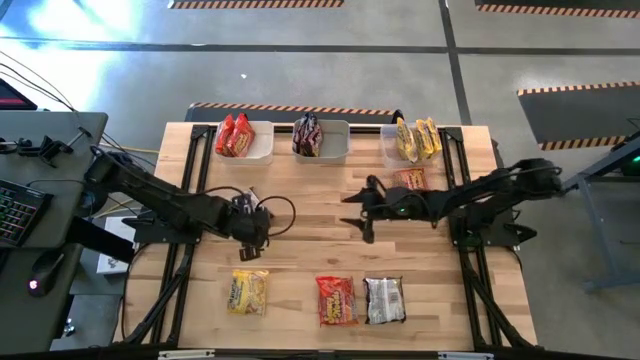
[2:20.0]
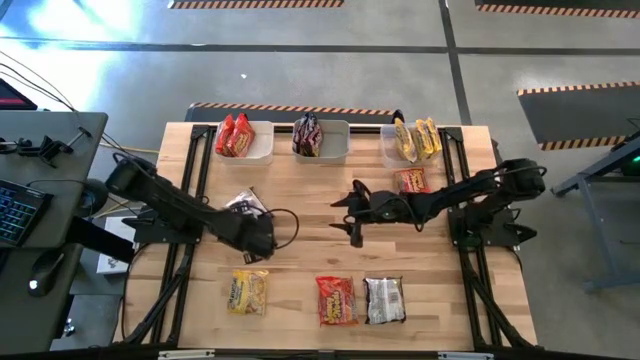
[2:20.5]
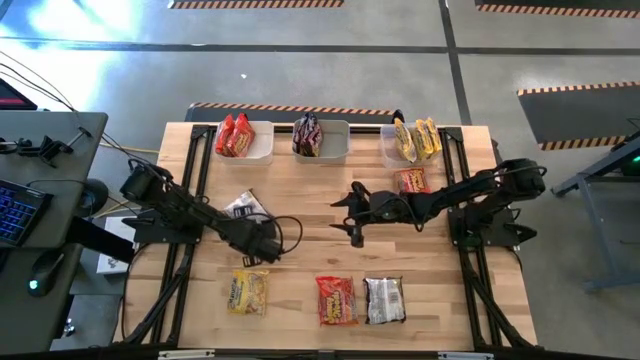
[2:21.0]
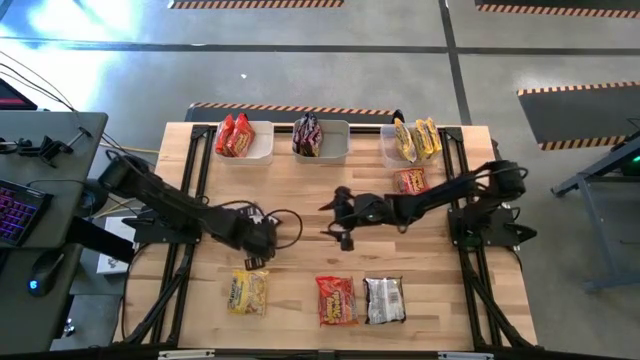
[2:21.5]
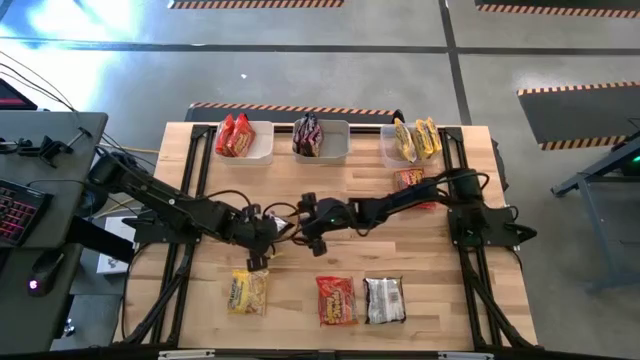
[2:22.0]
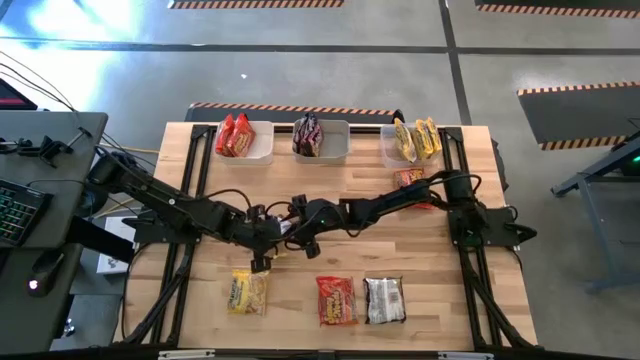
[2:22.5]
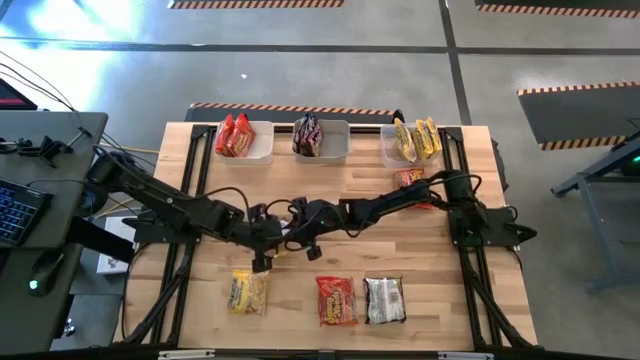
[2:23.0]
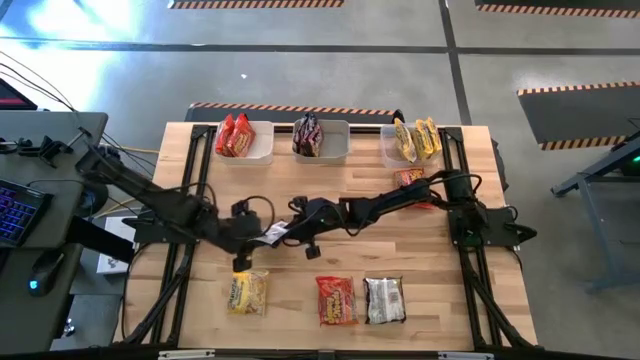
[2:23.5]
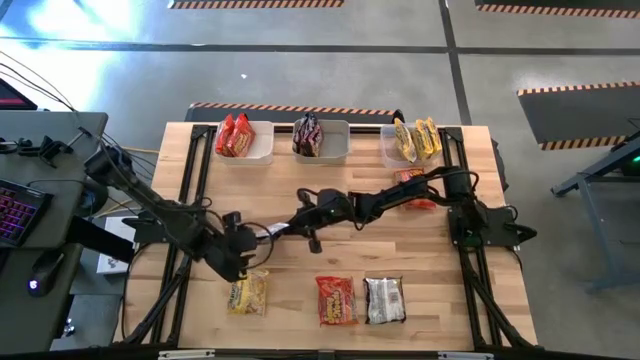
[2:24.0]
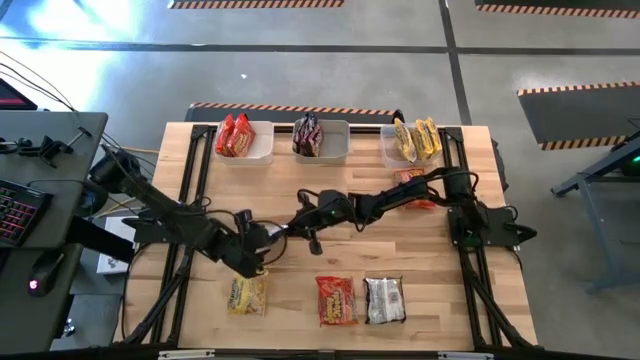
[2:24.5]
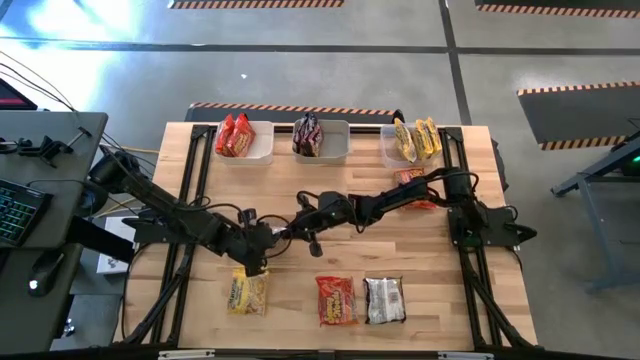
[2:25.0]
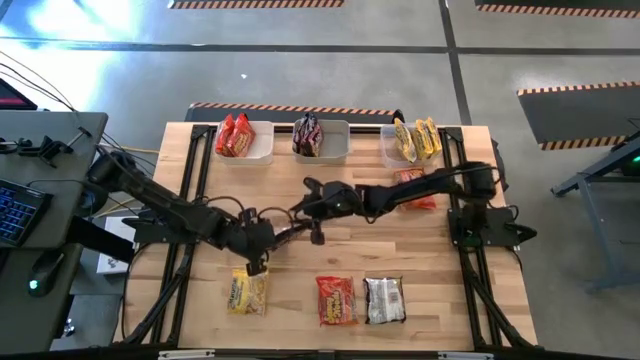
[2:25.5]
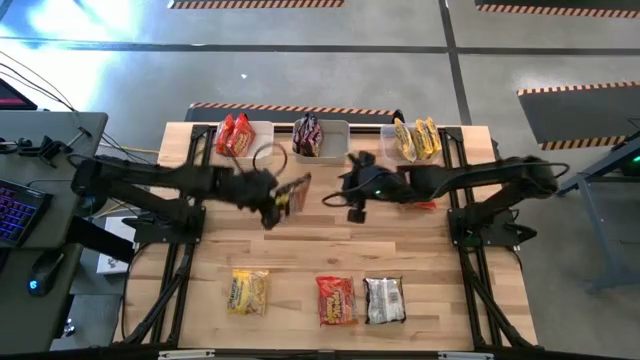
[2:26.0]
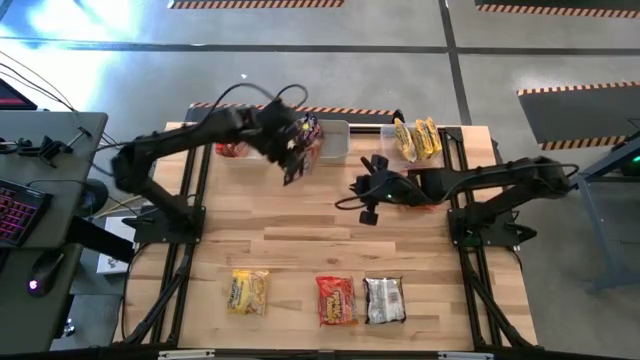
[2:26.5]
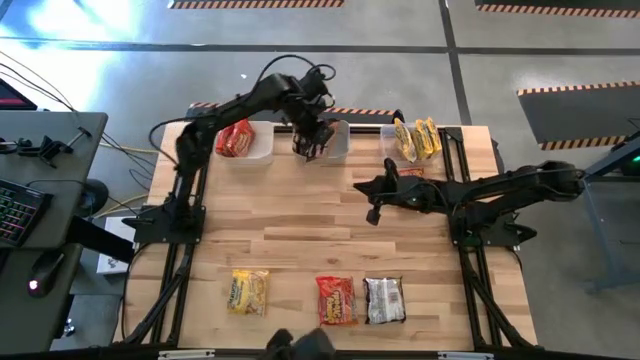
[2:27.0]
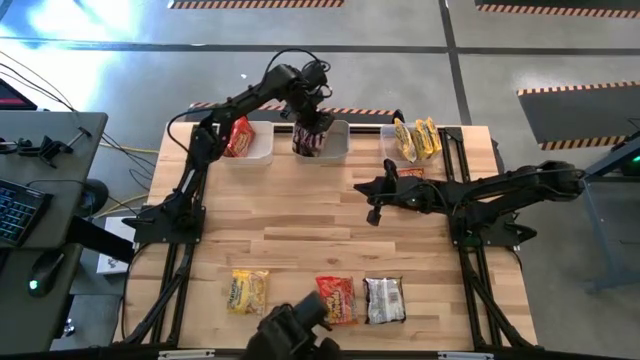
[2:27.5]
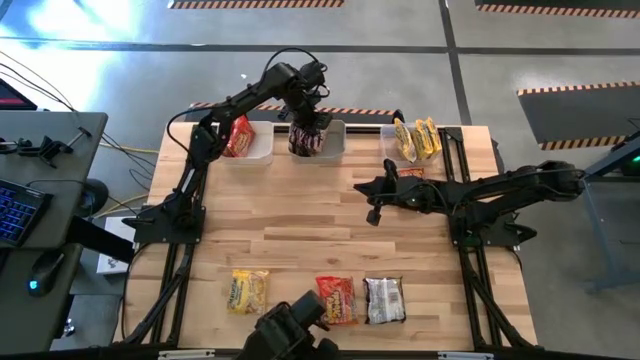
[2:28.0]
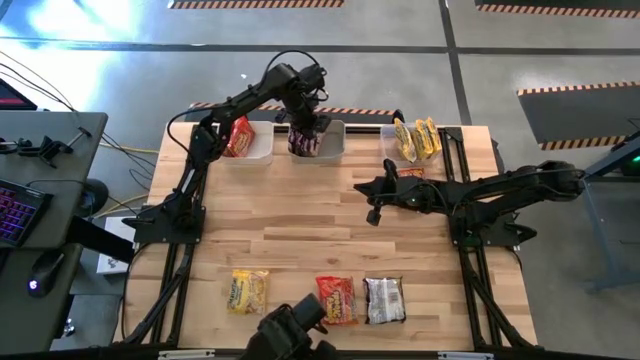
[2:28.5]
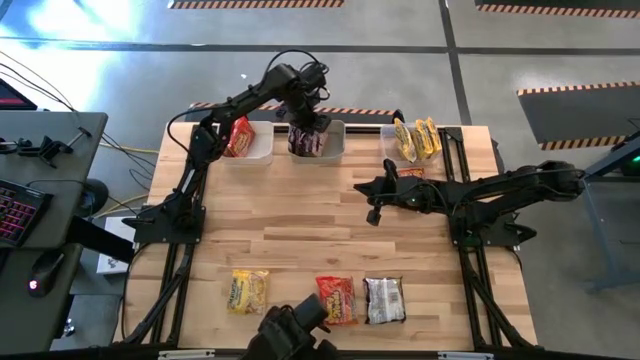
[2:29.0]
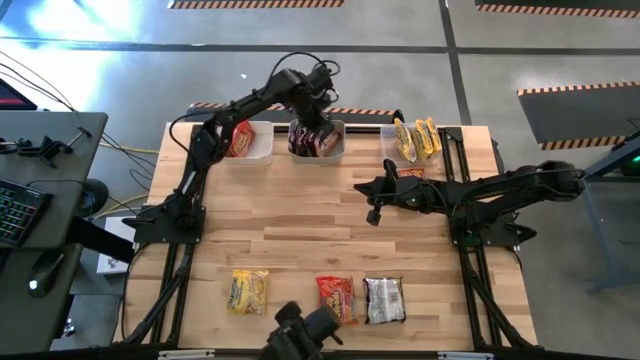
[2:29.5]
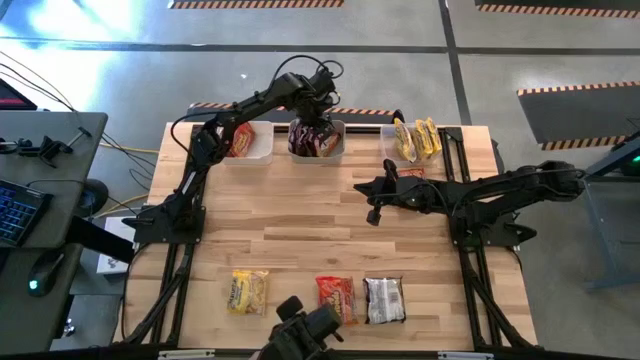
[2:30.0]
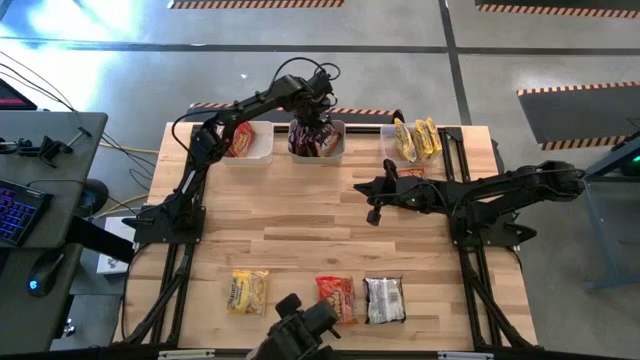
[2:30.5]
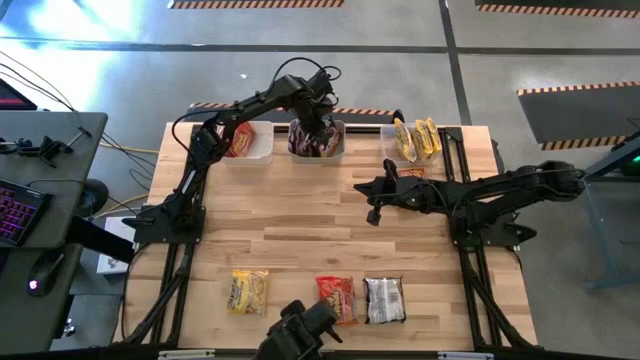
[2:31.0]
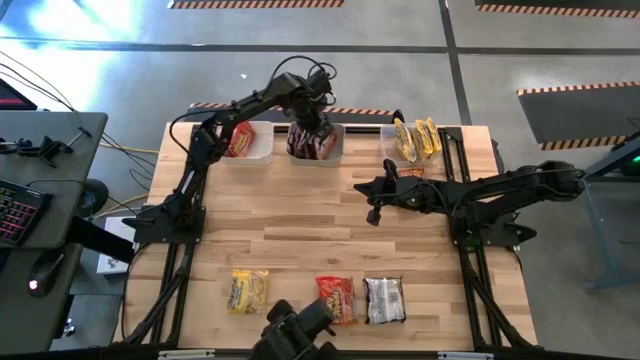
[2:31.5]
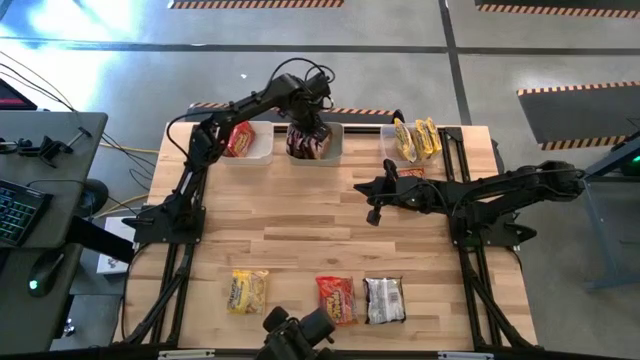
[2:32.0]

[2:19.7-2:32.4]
Task: Sort Maruchan noodles
Put the black noodle pack into the gray bin

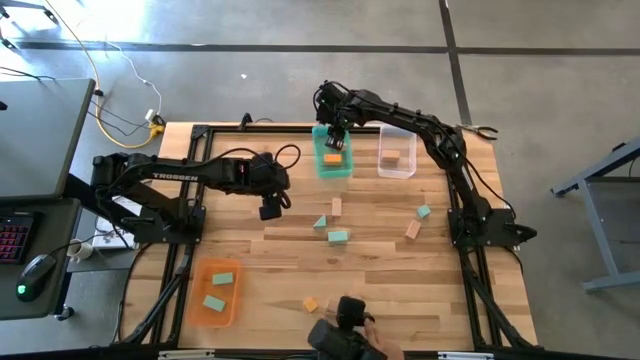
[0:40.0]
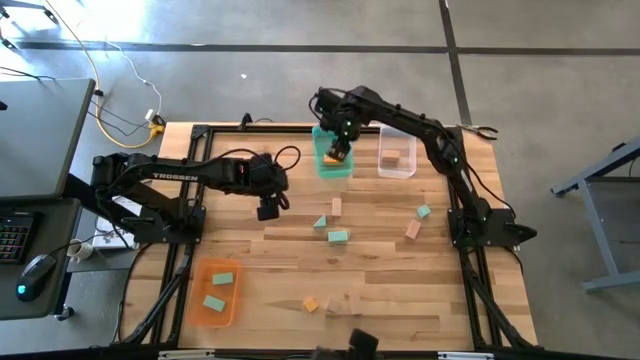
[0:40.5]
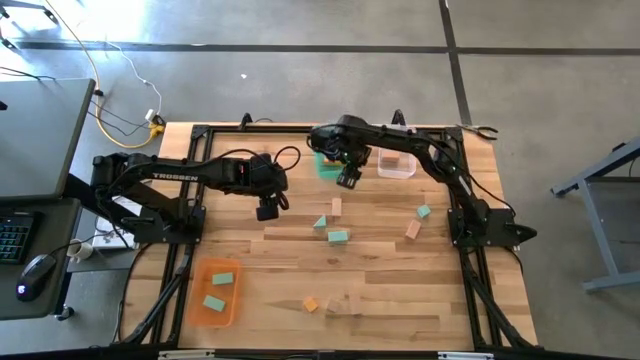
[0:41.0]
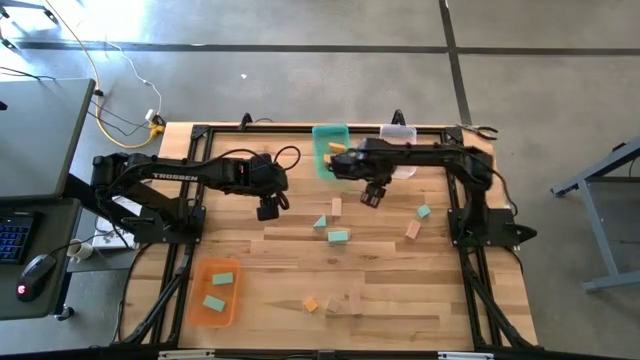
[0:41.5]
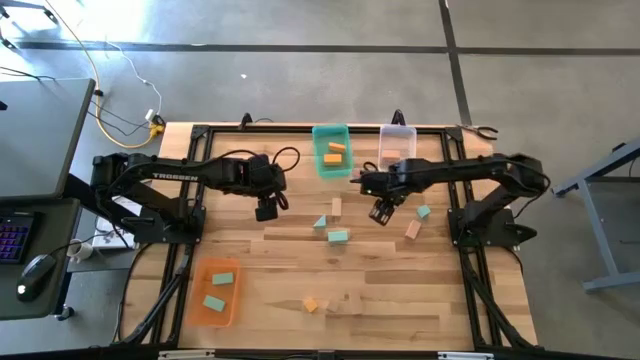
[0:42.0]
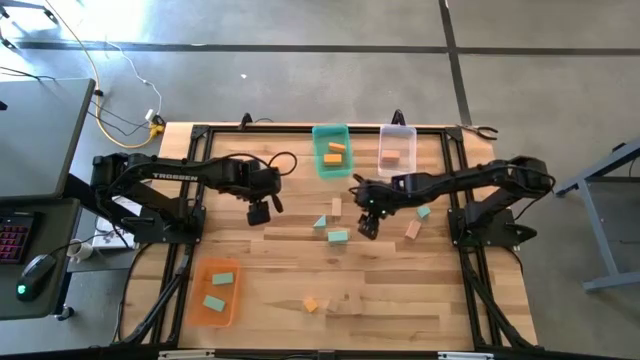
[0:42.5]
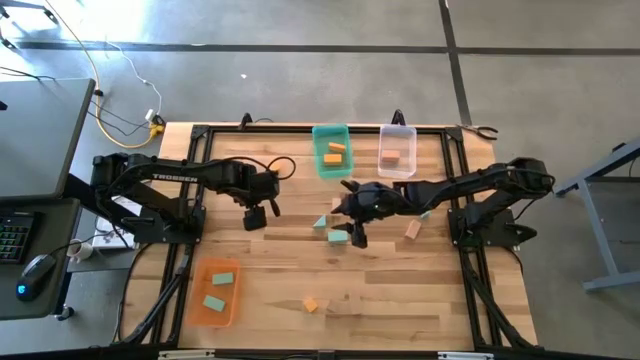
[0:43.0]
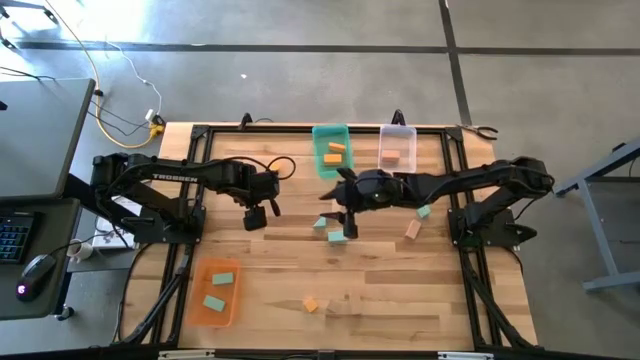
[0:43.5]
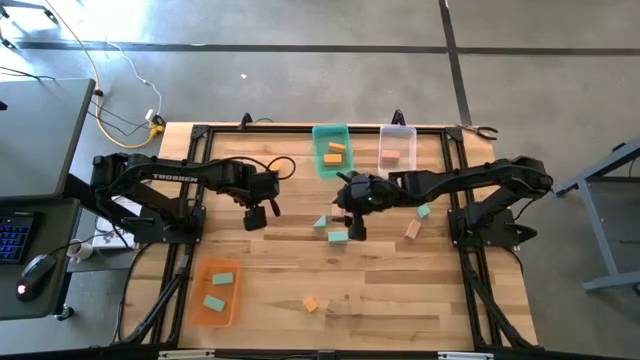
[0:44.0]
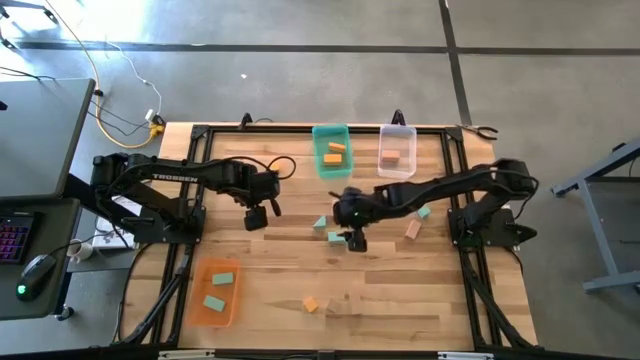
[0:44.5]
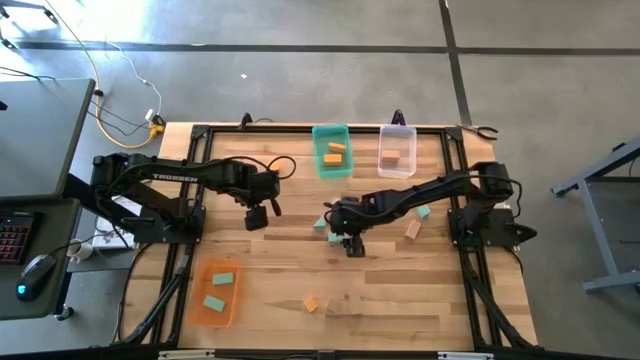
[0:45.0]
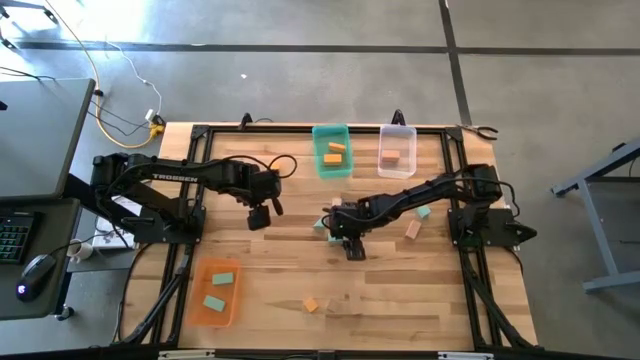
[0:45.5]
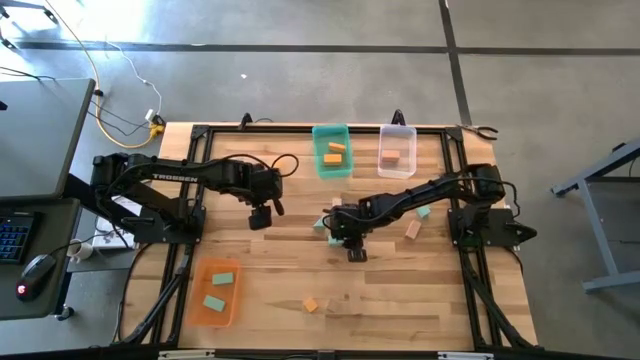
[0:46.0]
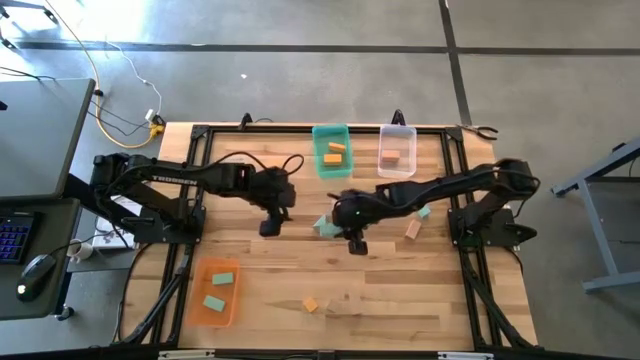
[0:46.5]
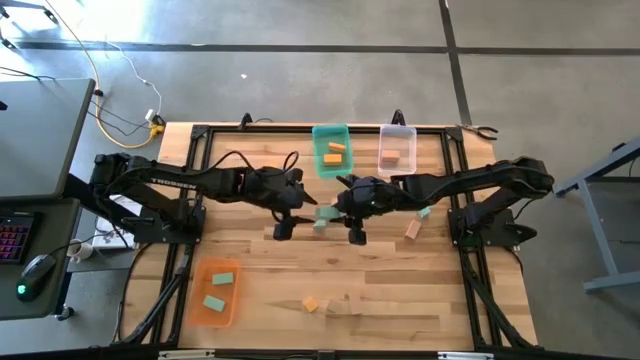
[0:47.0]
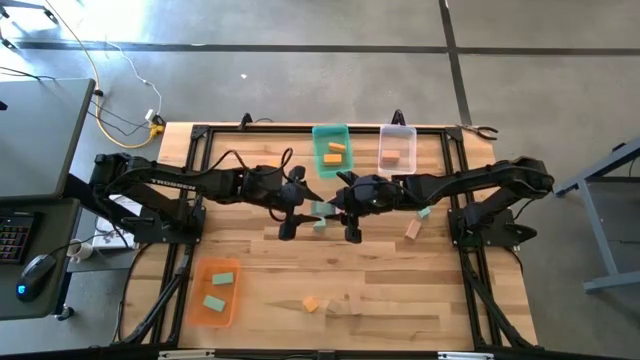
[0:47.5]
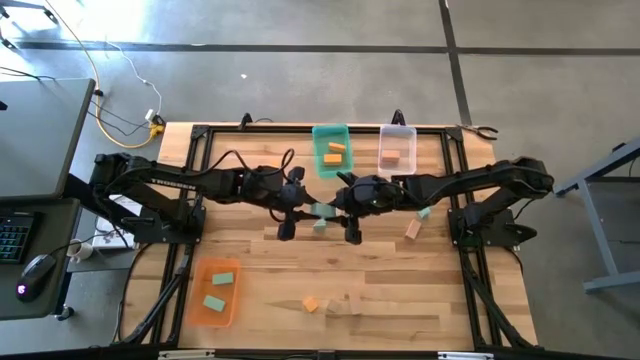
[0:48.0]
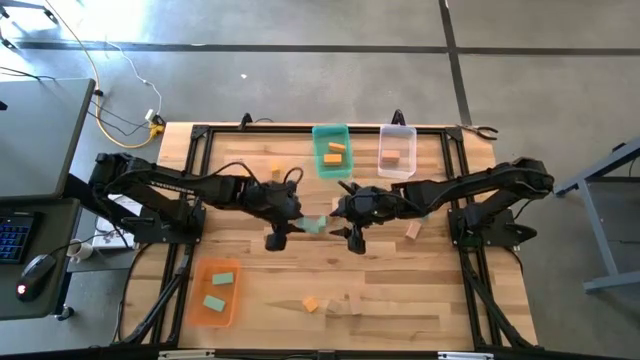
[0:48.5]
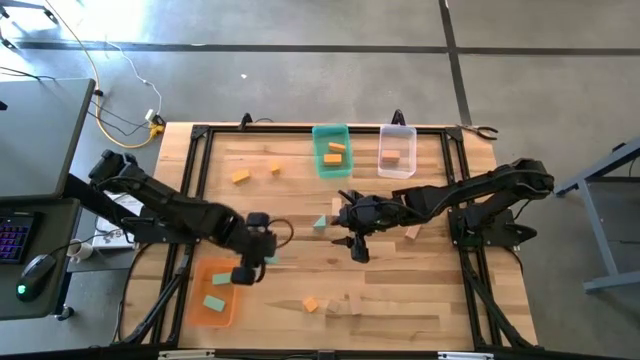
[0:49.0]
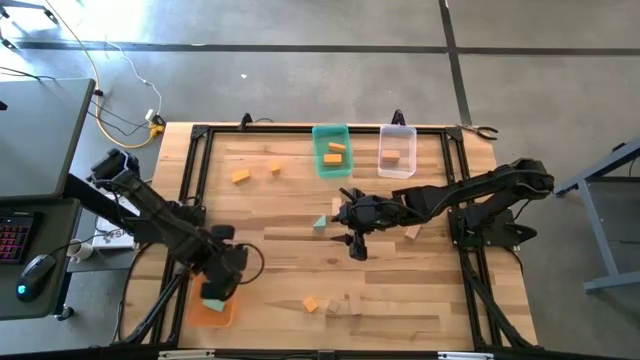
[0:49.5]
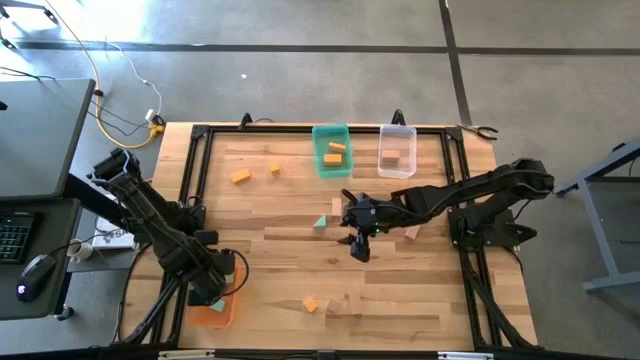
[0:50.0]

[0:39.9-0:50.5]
Task: Sort & place blocks by color
Put the light blue block into the orange bin

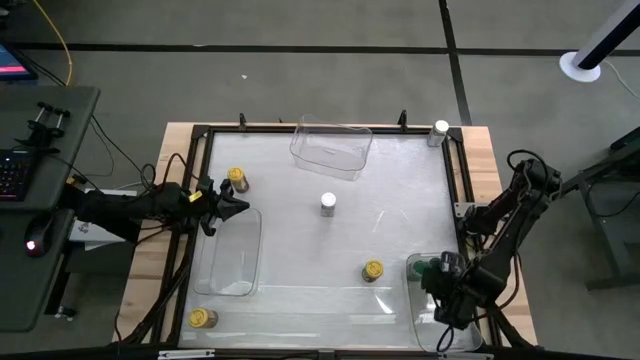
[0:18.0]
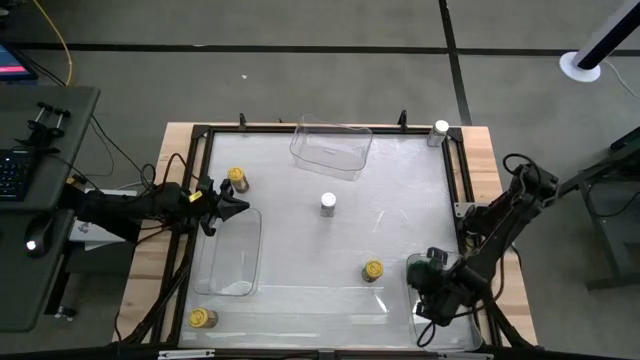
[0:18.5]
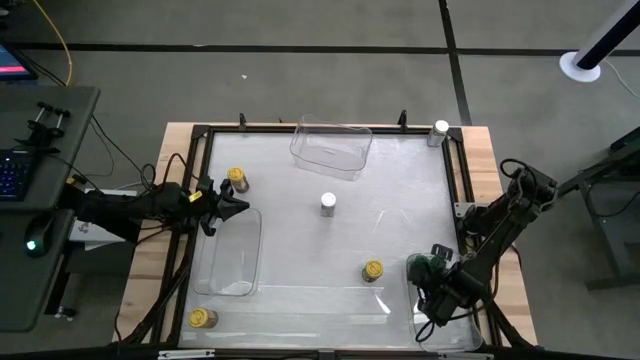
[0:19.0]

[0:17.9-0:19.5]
Task: Sort spices by type
Adjust the left green seasoning bottle in the right transparent bin
